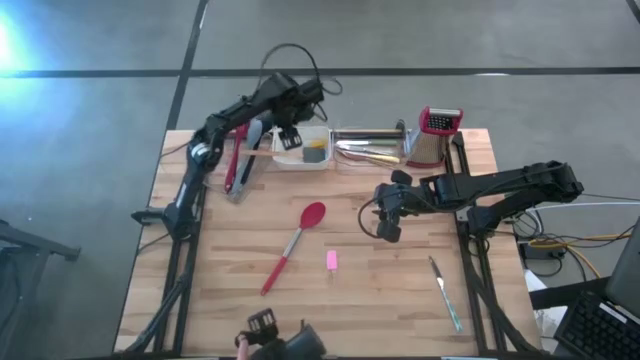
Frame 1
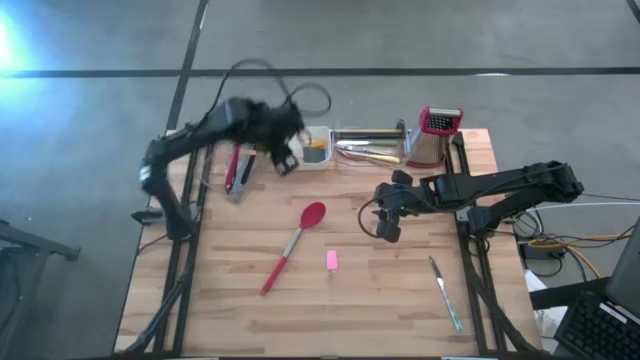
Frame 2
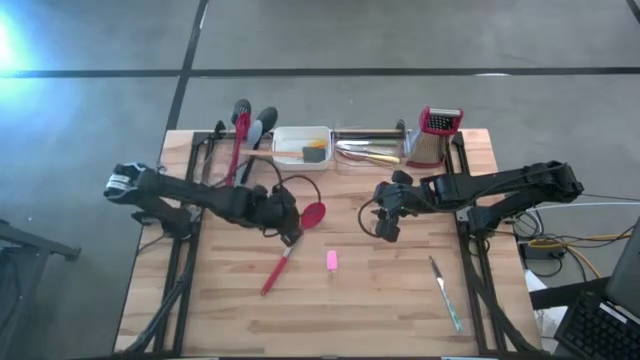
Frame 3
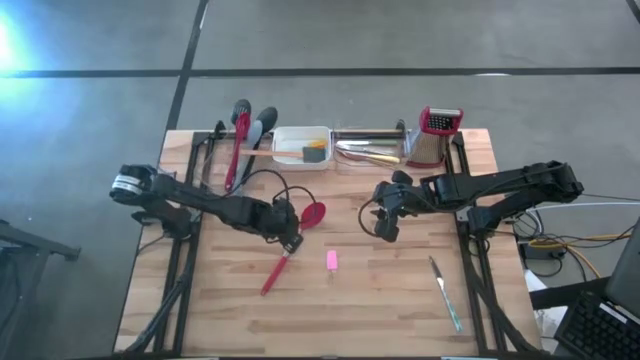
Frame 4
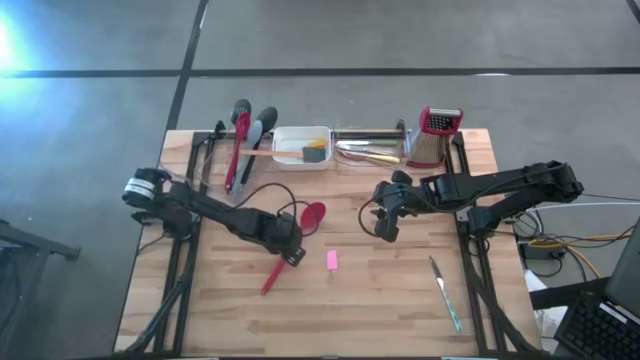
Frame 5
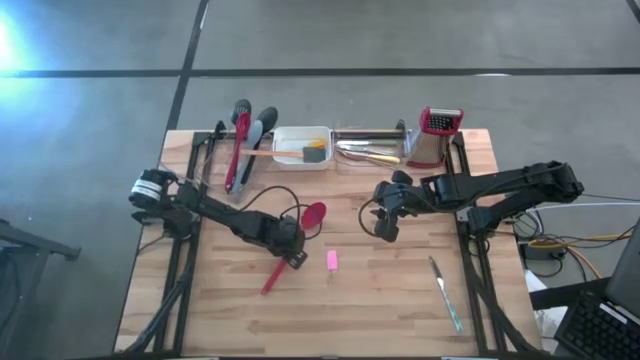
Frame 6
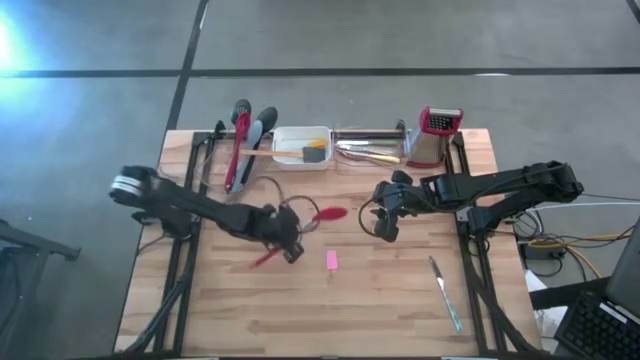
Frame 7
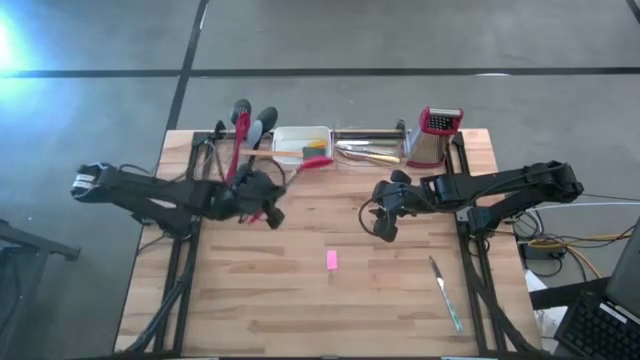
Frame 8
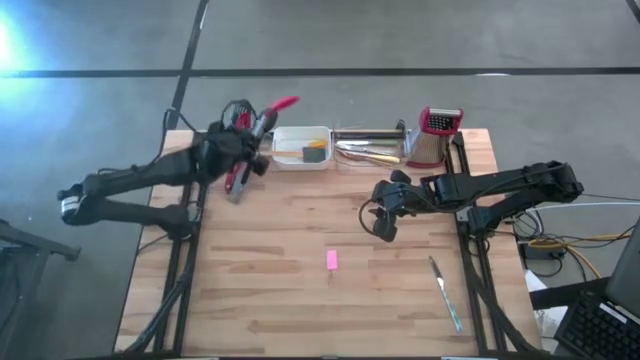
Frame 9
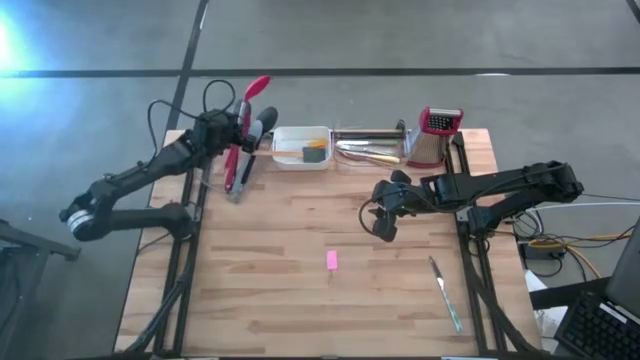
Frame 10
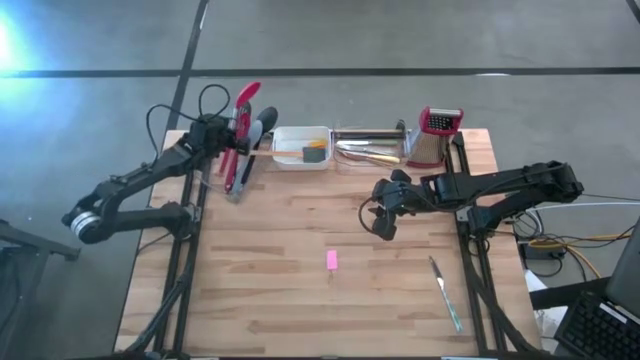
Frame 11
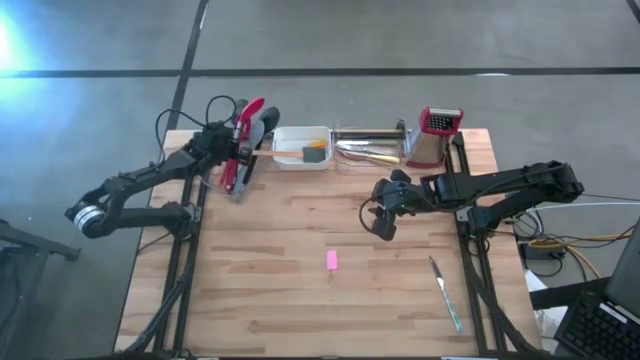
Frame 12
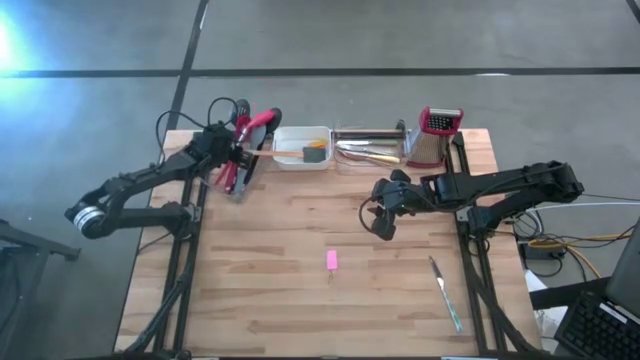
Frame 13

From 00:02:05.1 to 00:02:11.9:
Task: Pick & Place Kitchen Items
Put the red serving spoon into the left transparent bin

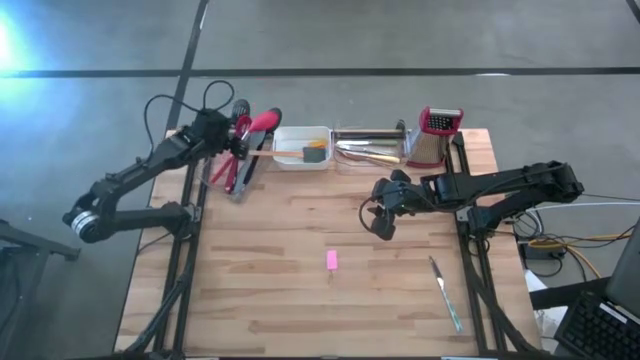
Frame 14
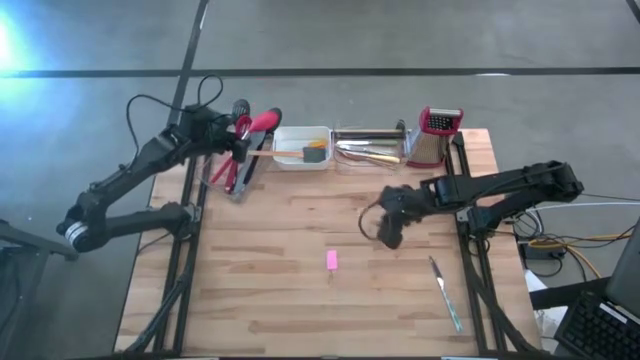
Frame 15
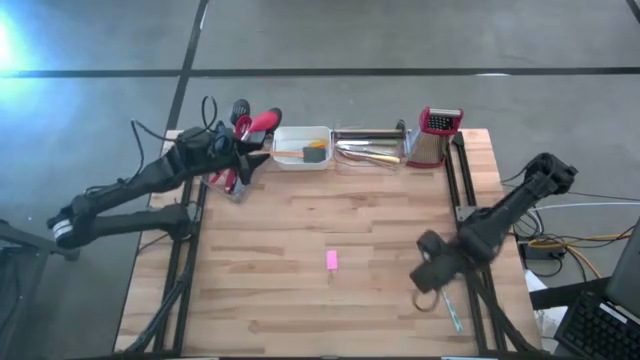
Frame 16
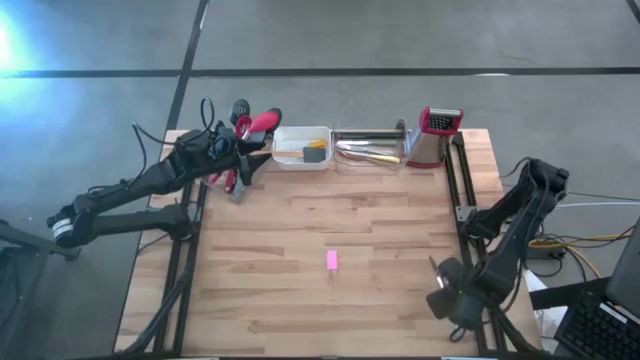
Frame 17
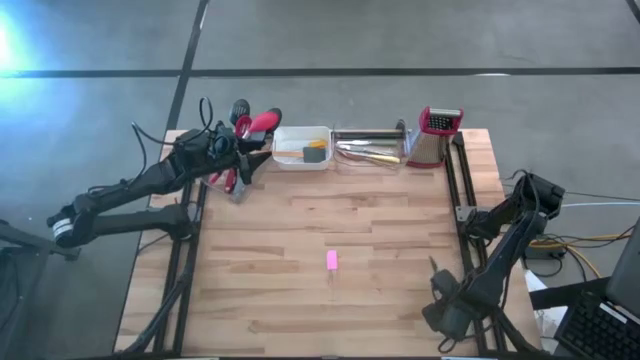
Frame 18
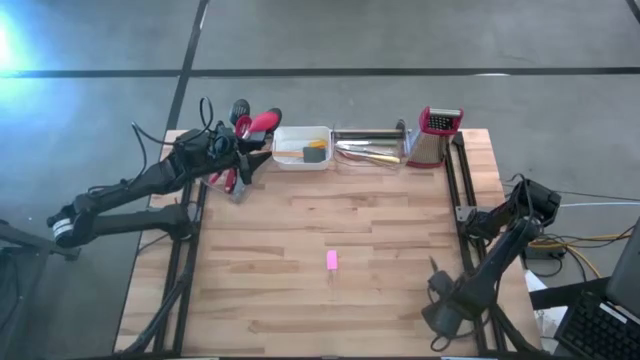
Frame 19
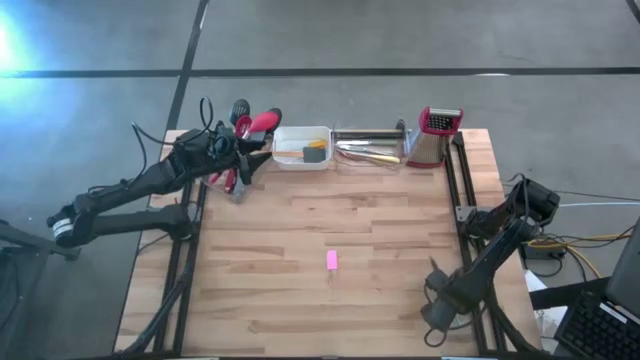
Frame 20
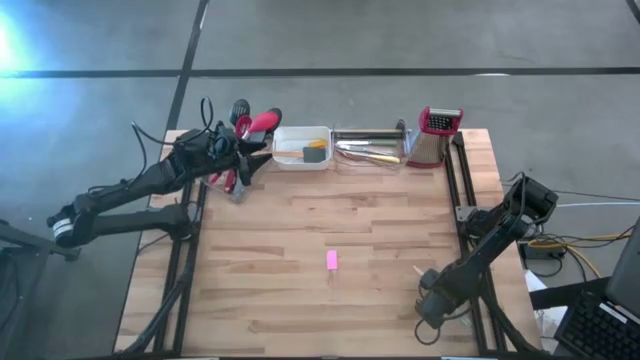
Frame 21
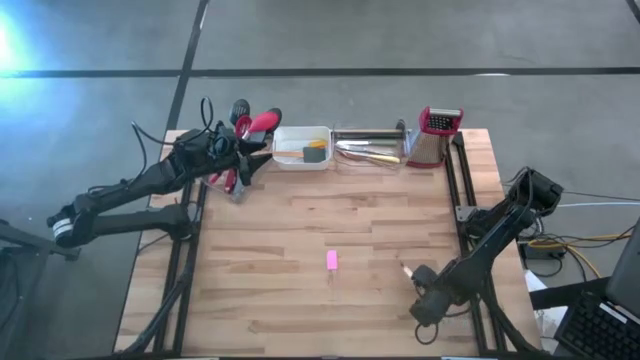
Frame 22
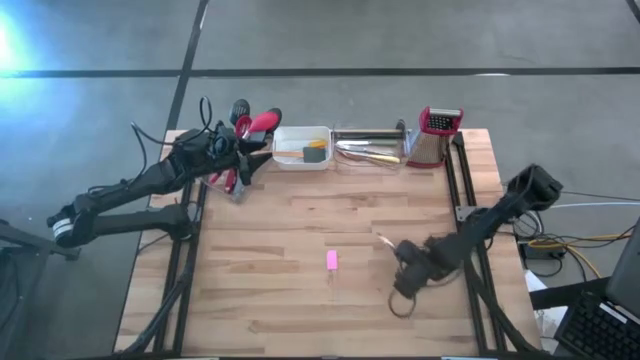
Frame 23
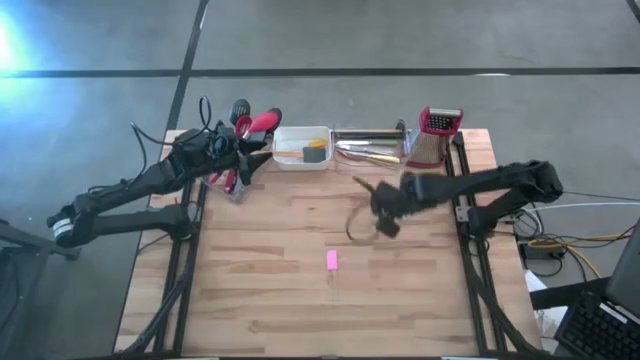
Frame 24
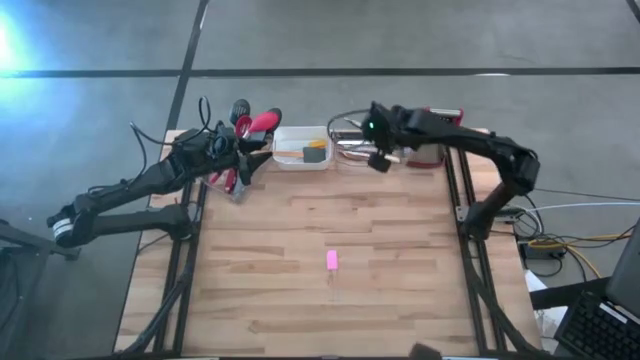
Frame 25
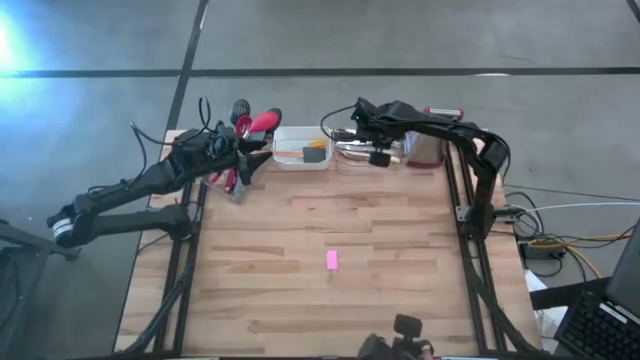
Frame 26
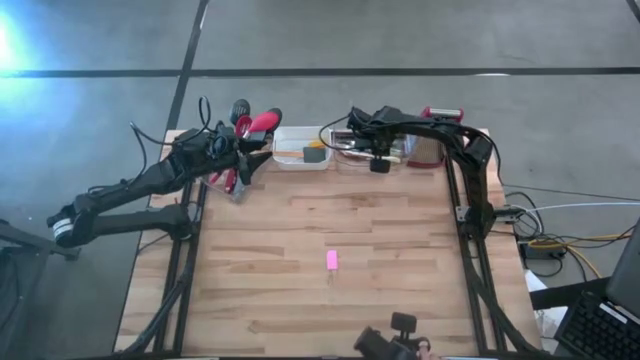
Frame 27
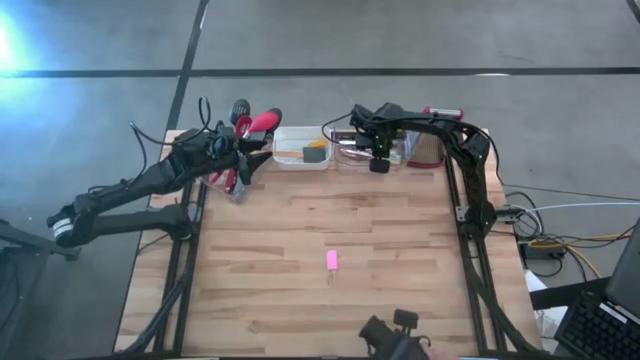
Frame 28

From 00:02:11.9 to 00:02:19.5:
Put the blue table knife into the right transparent bin

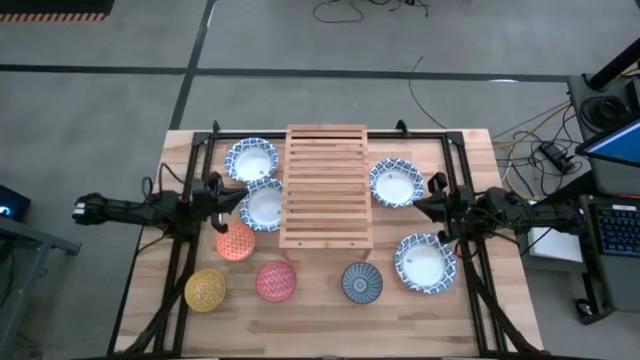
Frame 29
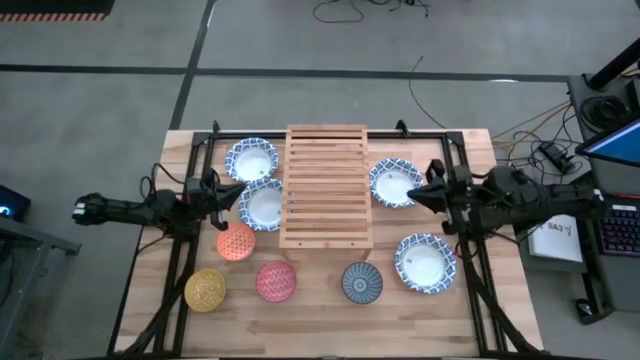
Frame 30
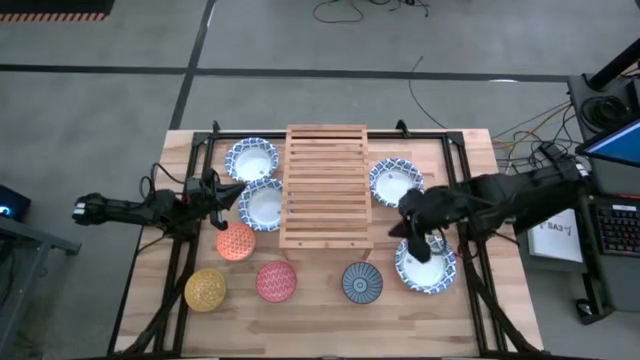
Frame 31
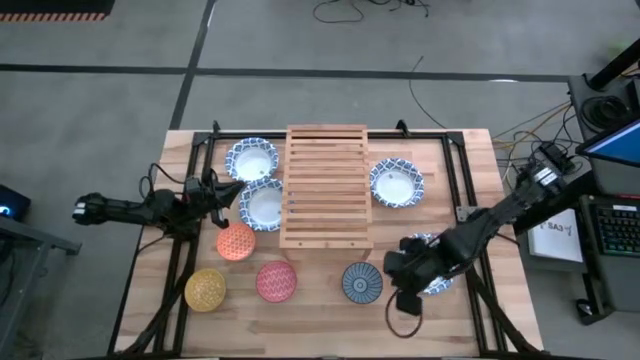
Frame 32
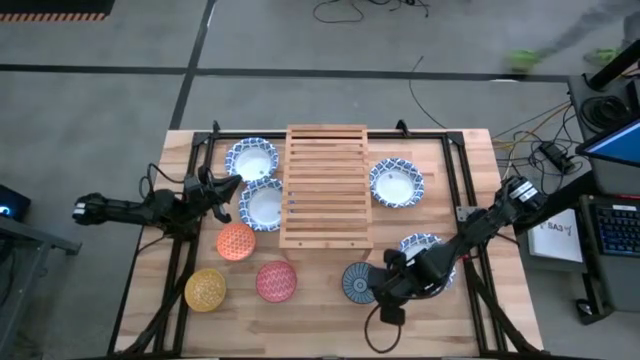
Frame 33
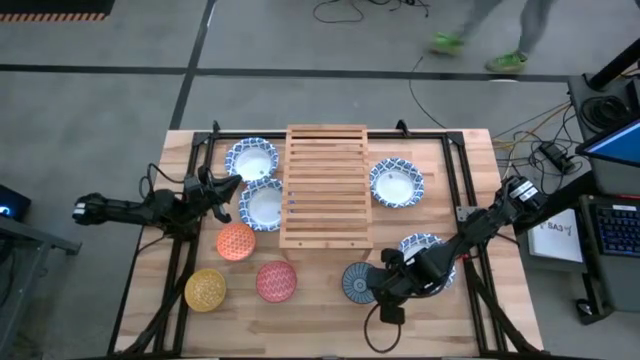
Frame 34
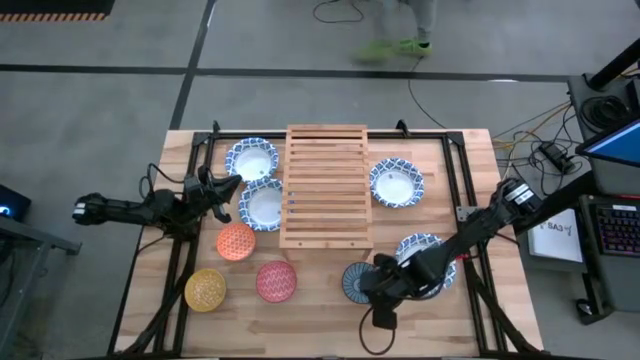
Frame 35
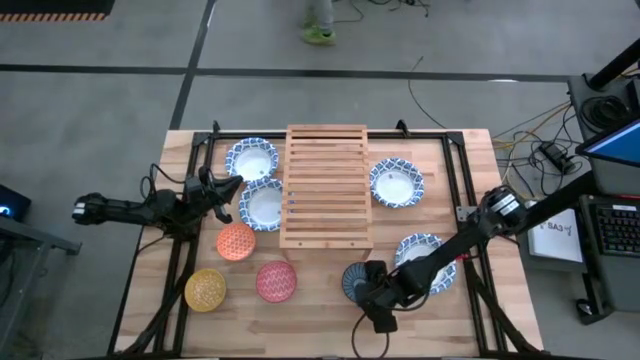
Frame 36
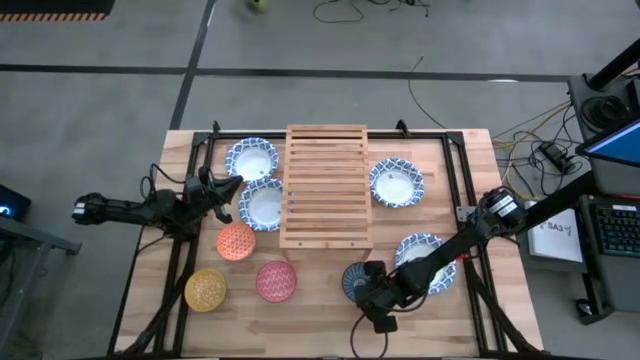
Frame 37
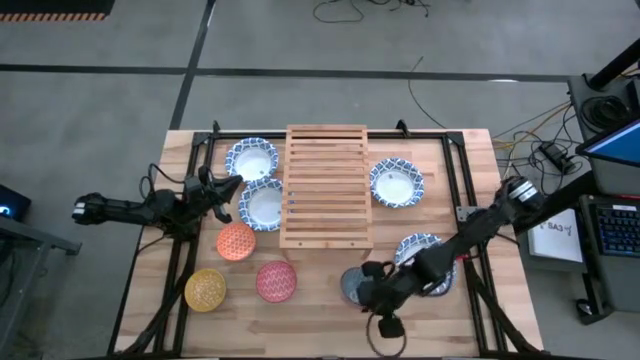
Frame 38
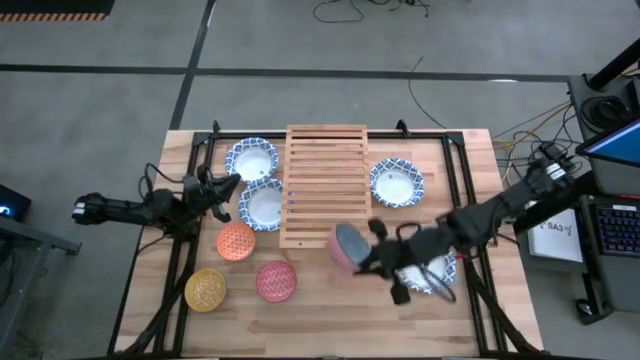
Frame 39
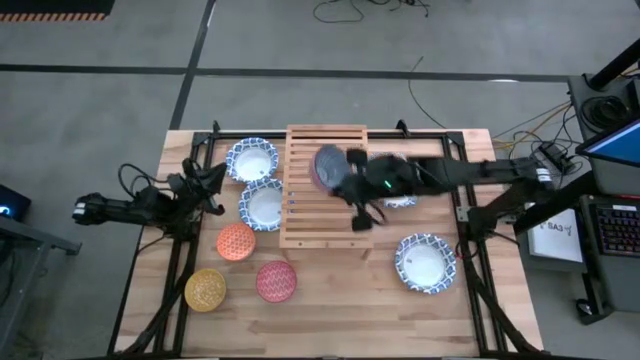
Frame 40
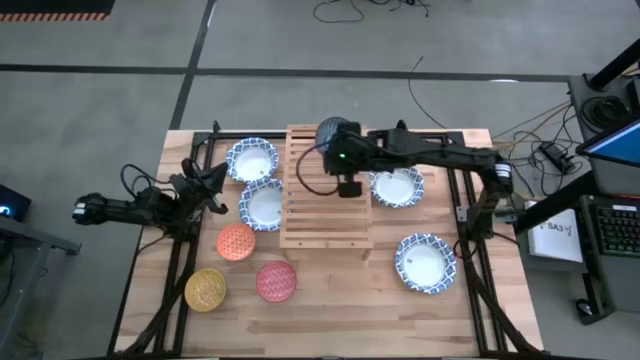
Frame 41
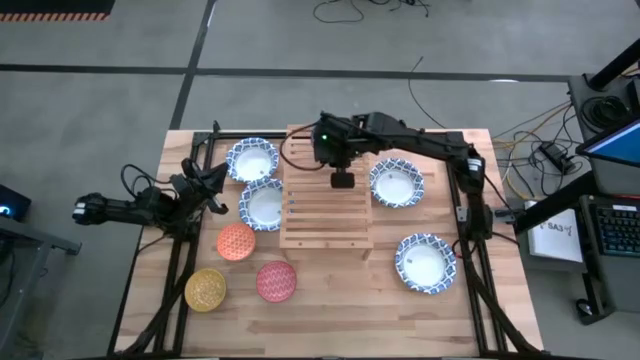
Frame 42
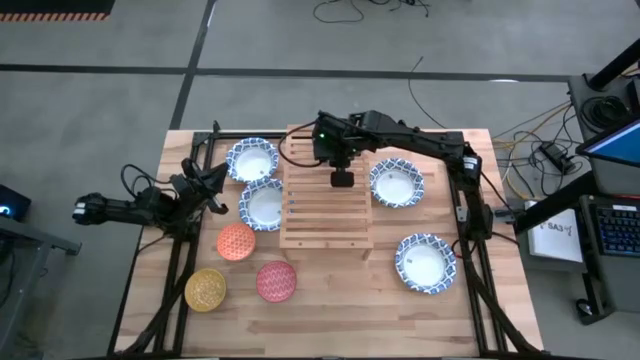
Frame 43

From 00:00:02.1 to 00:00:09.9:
Task: Place and stack bowls onto a shelf
Put the blue bowl on the shelf
